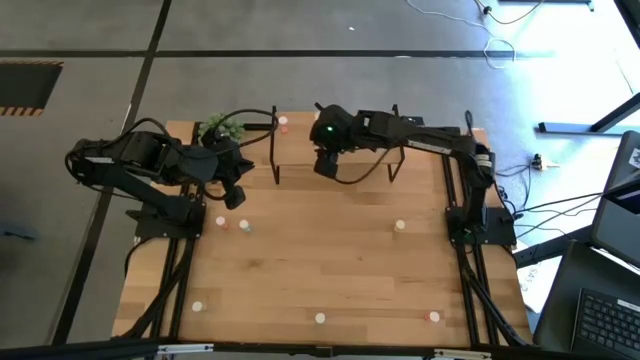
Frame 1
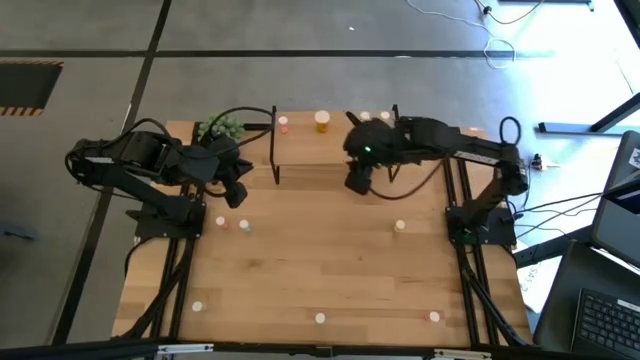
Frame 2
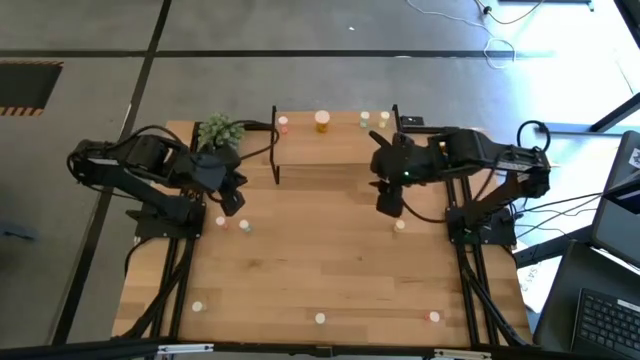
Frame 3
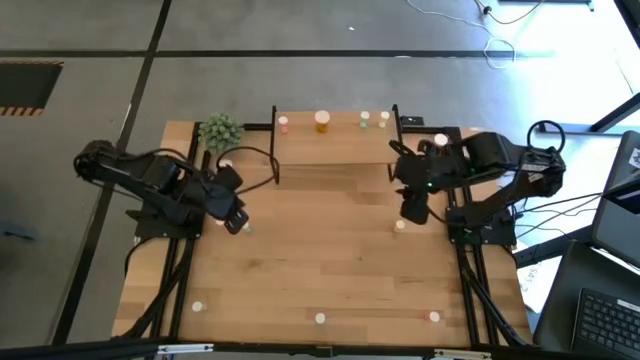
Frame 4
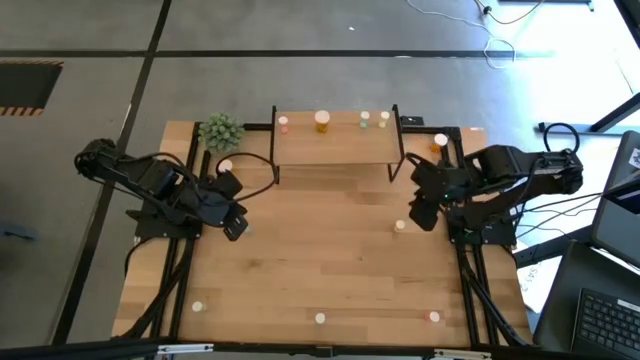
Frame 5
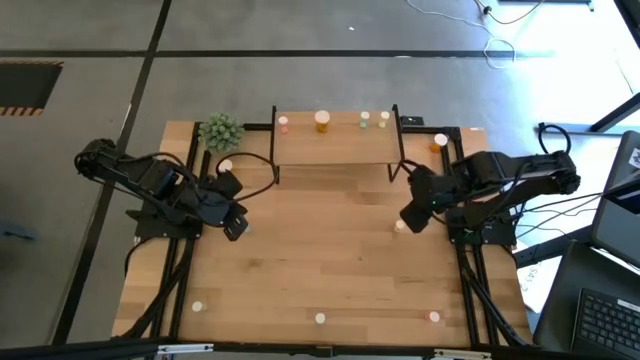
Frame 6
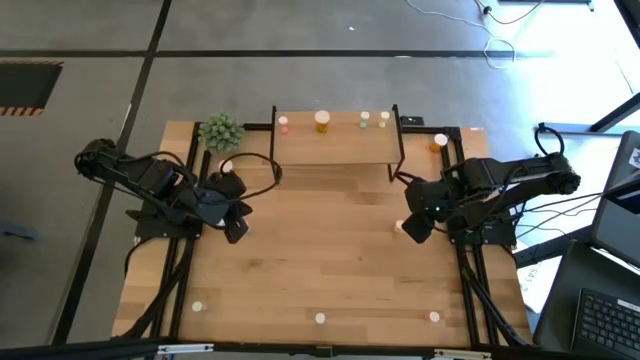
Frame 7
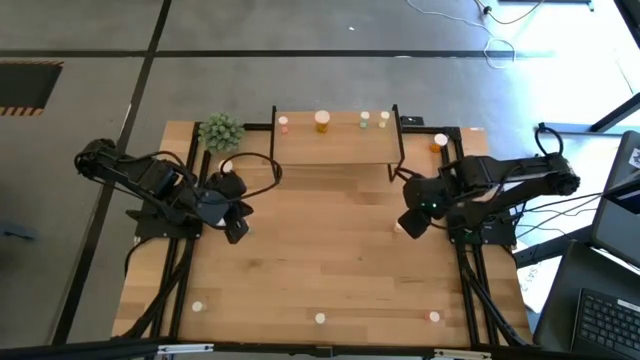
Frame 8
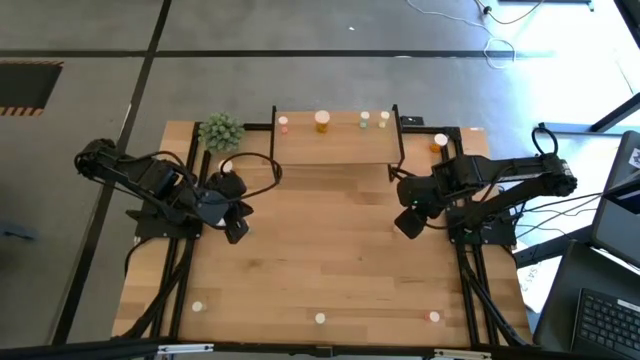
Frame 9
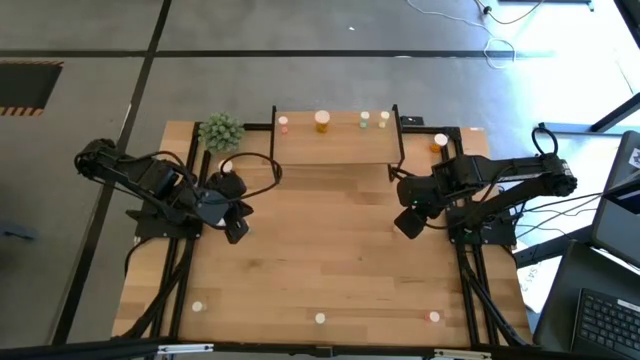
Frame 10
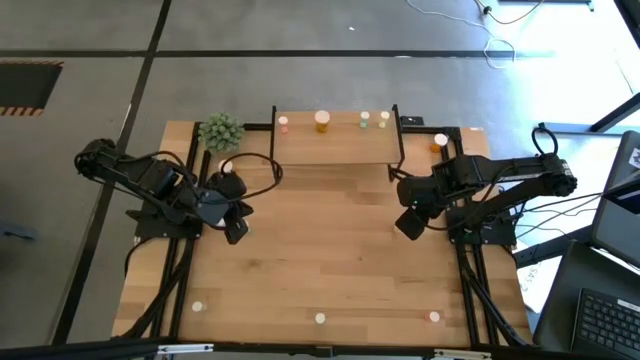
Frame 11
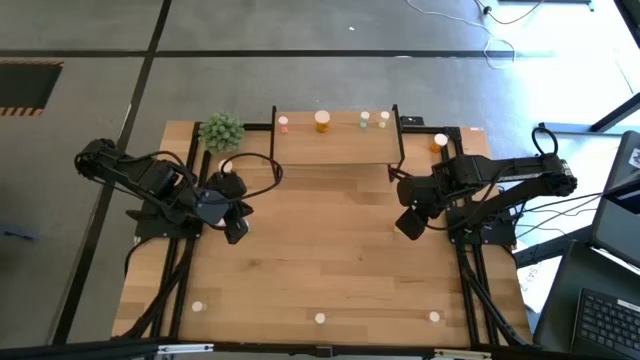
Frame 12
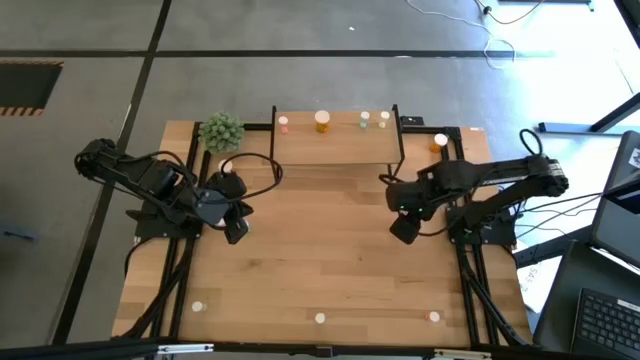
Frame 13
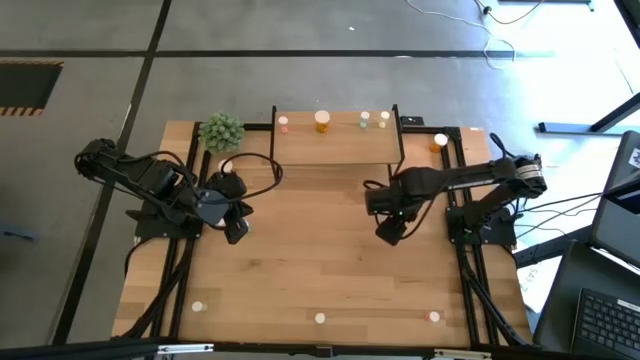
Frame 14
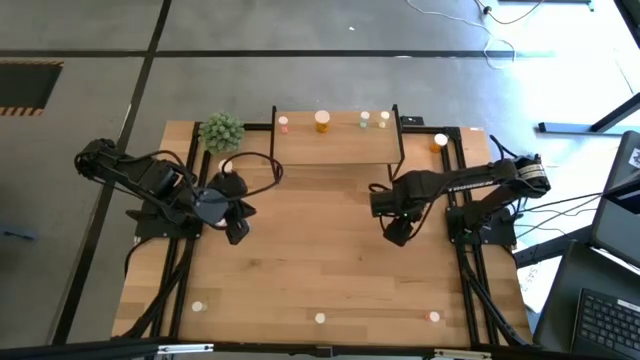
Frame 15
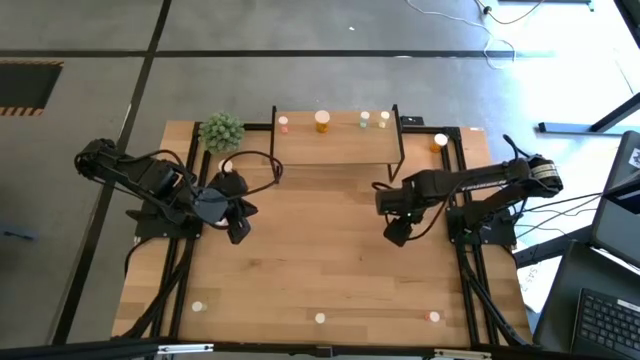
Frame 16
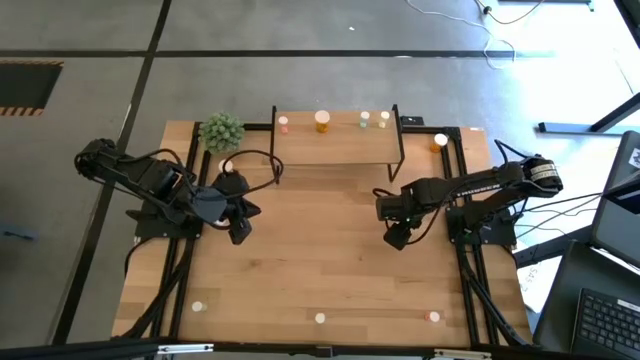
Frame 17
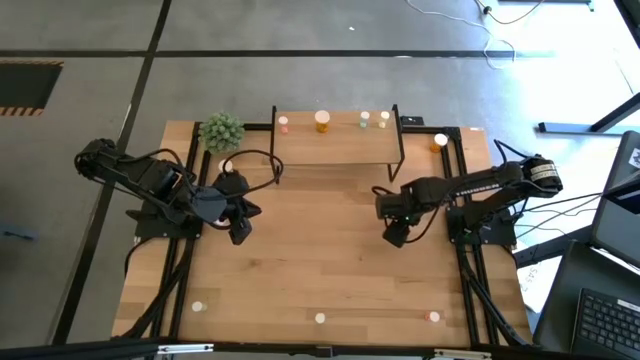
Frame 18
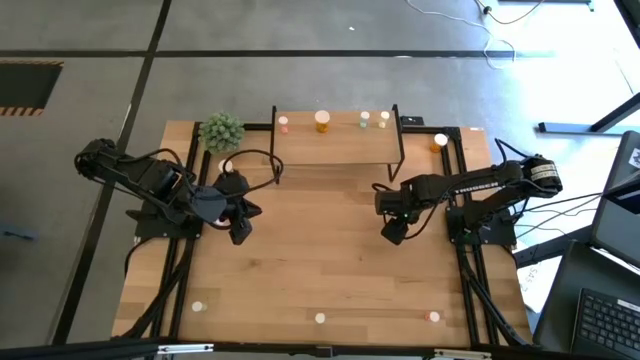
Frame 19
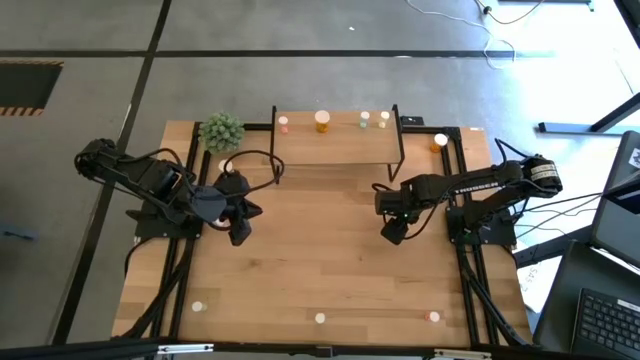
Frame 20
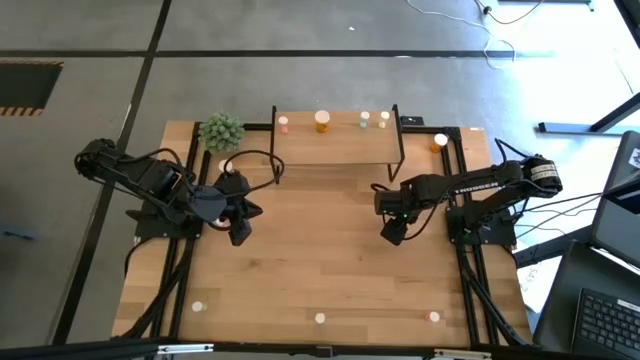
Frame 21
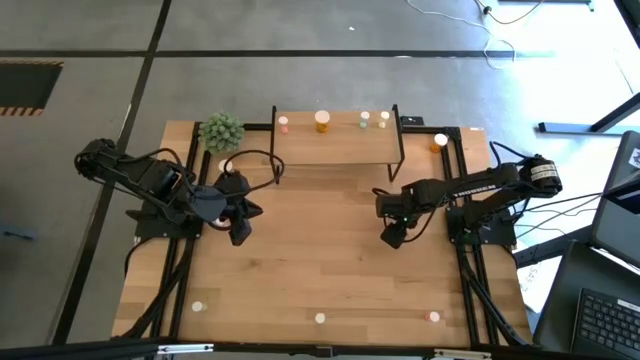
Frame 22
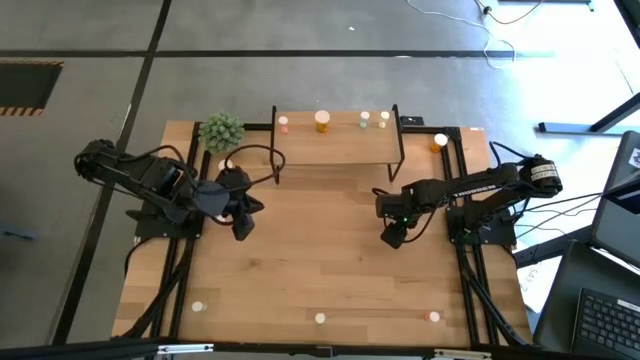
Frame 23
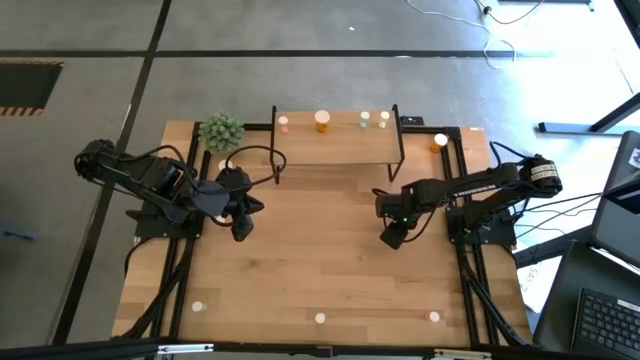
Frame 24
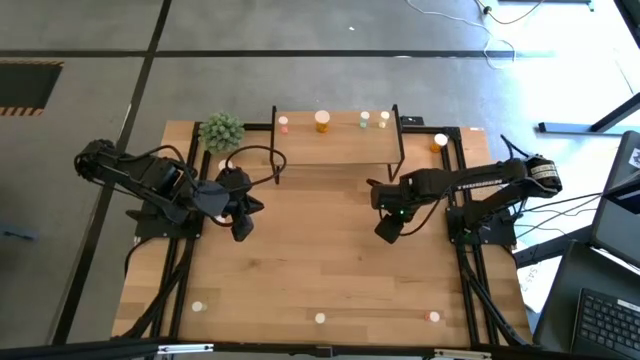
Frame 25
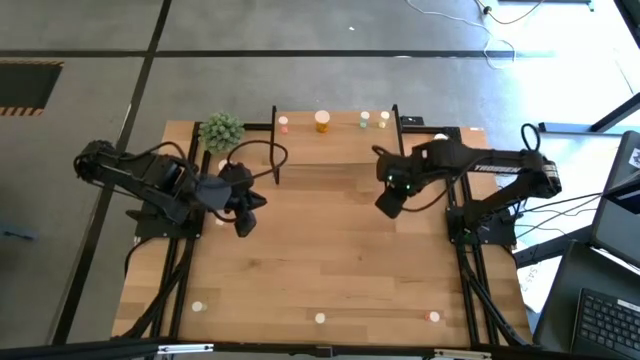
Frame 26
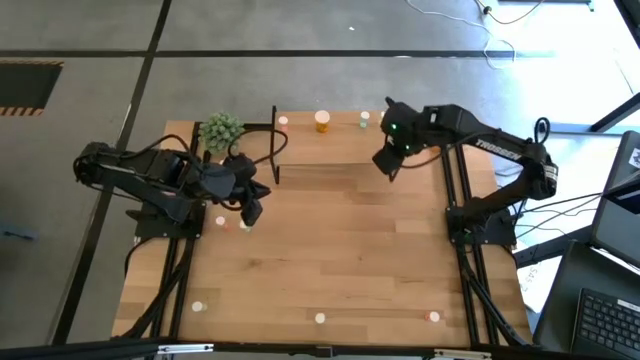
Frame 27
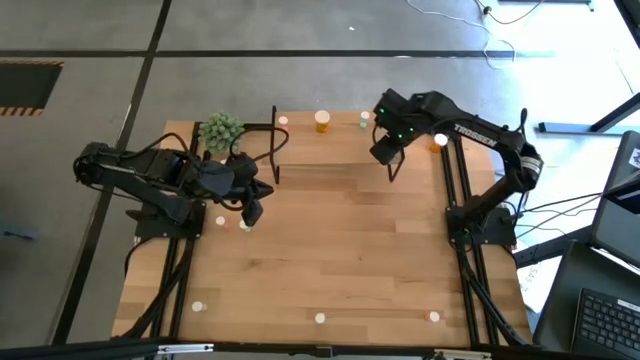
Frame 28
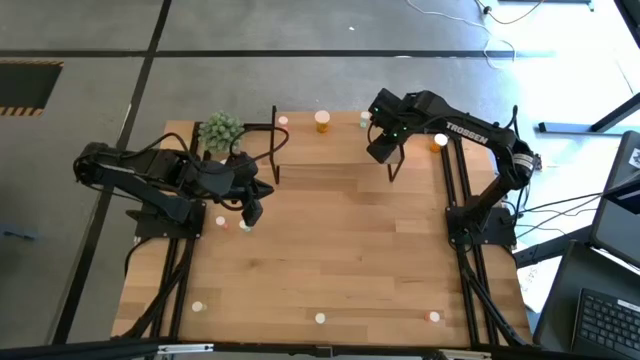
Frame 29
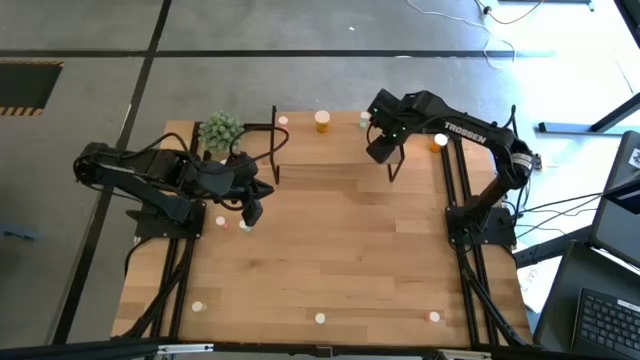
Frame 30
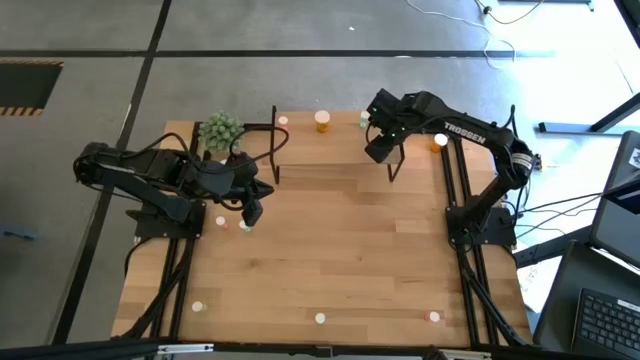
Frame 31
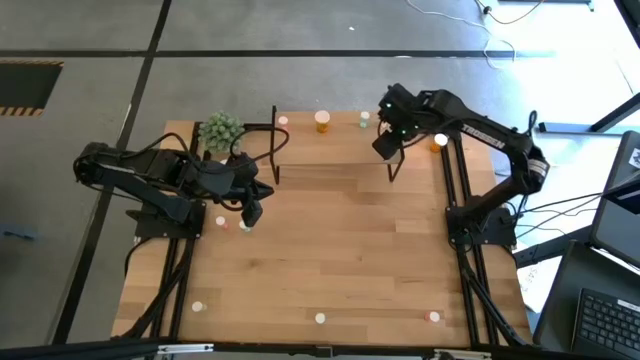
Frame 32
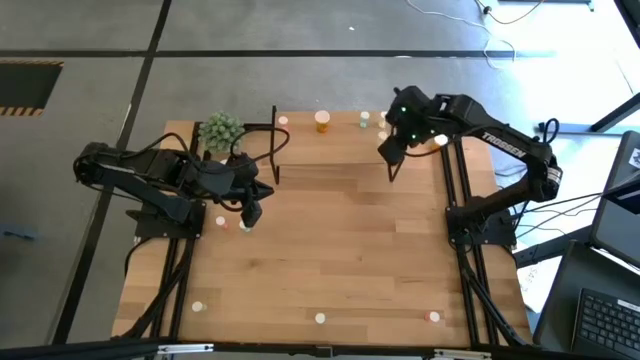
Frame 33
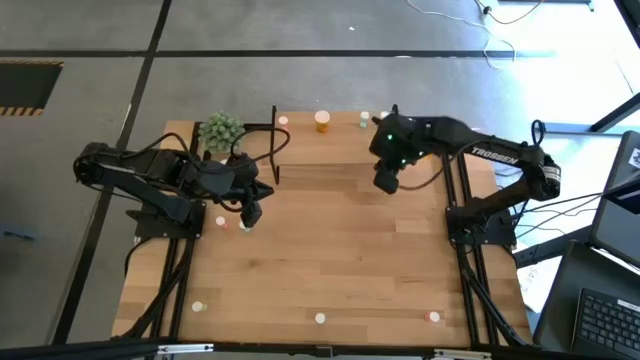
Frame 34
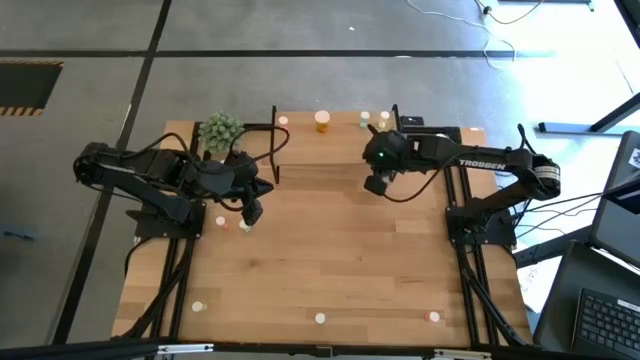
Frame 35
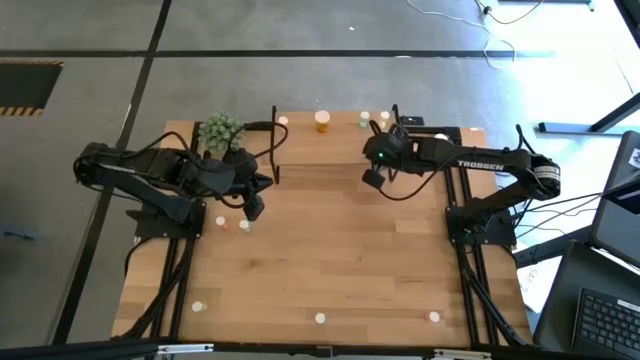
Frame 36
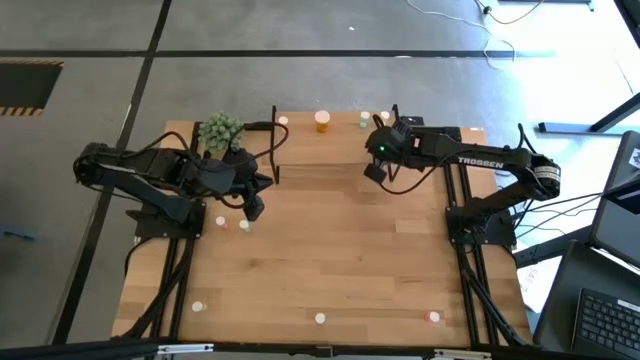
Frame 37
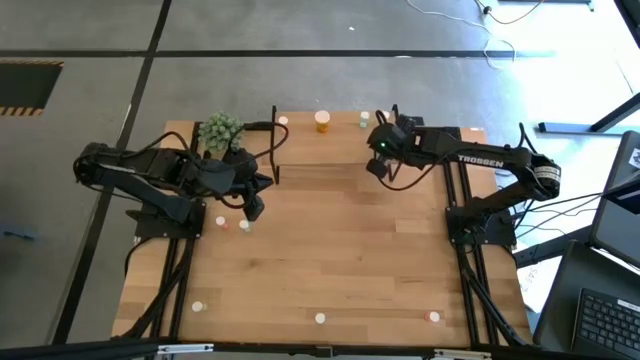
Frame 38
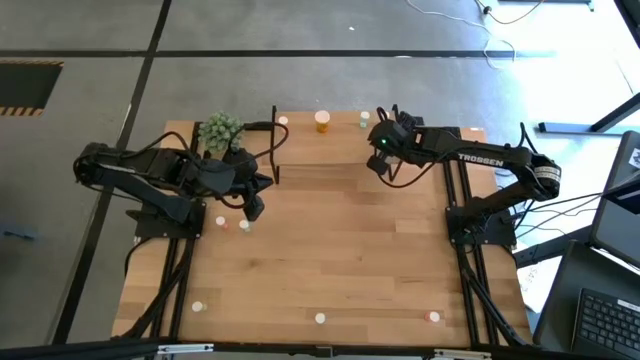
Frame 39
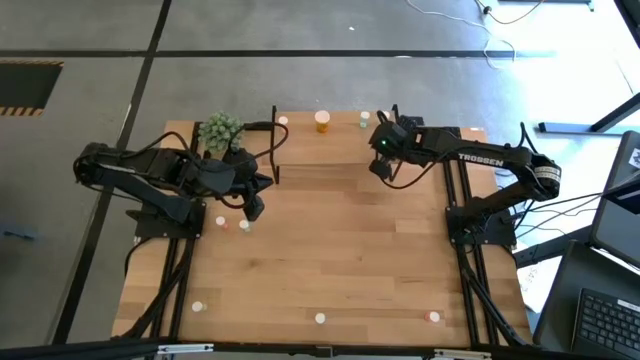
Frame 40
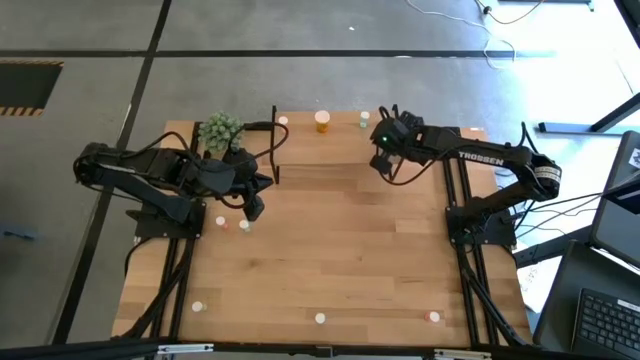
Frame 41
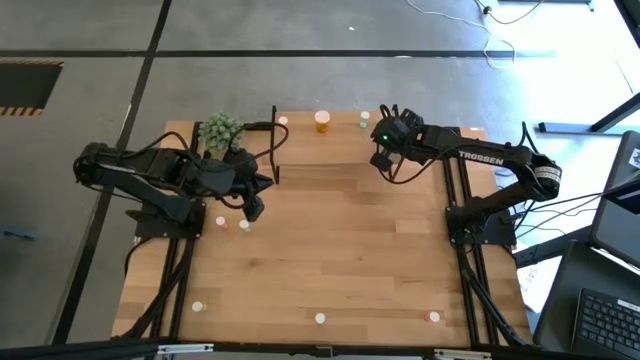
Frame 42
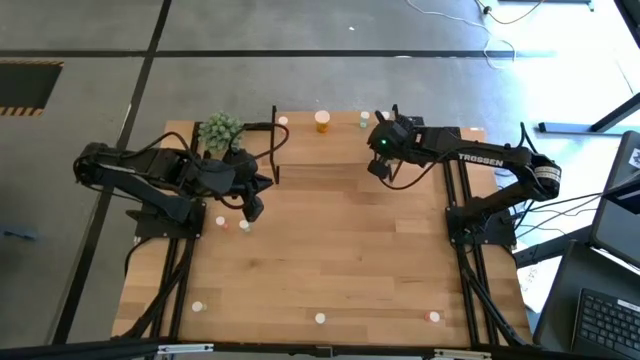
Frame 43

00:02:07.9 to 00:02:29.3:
Task: Pick and place medicine bottles onto shelf by color
Put the top yellow medicine bottle on the shelf, aligned with the other yellow medicine bottle
